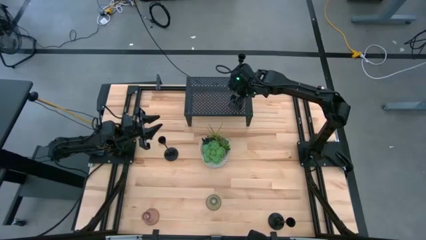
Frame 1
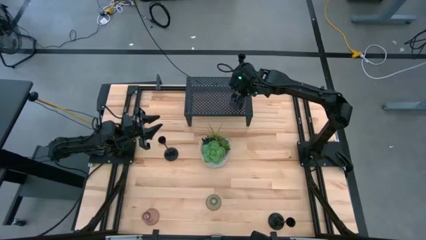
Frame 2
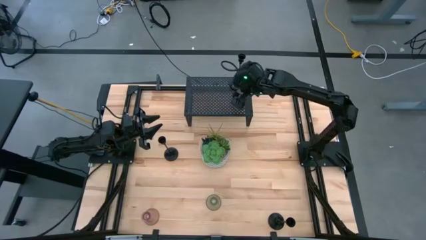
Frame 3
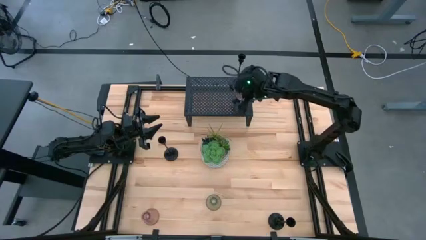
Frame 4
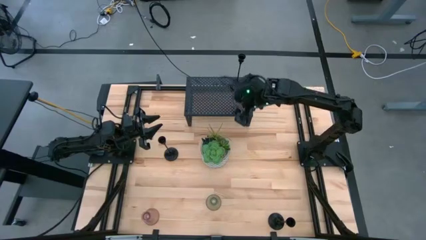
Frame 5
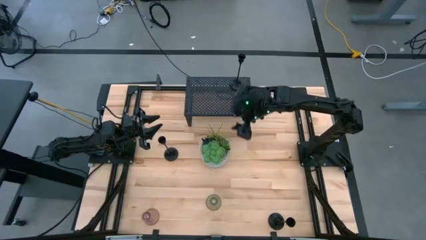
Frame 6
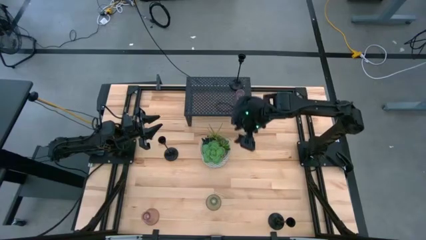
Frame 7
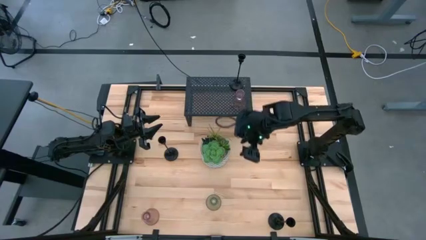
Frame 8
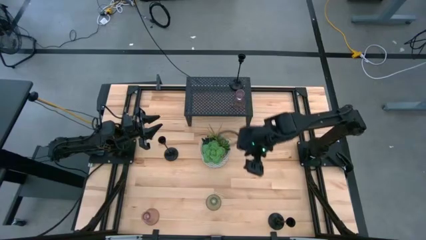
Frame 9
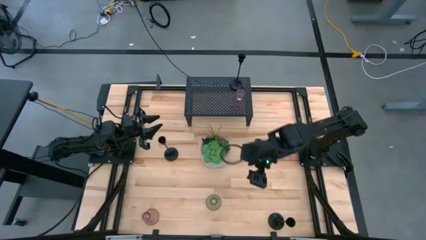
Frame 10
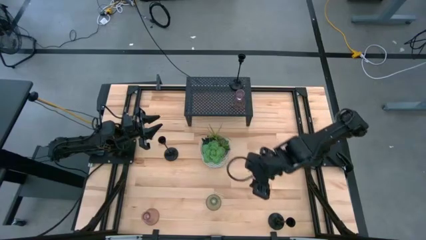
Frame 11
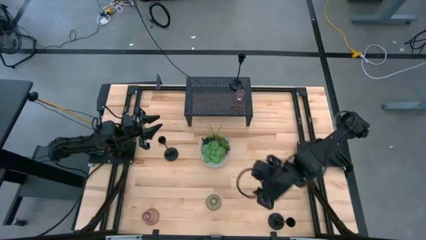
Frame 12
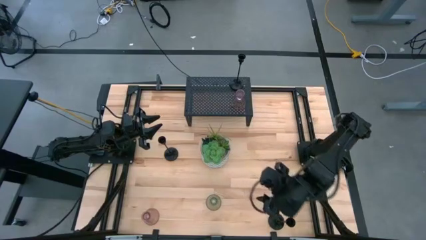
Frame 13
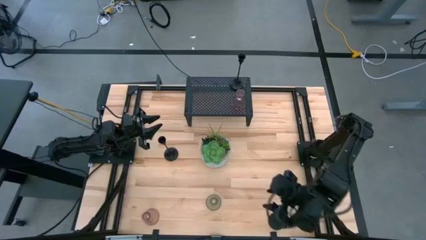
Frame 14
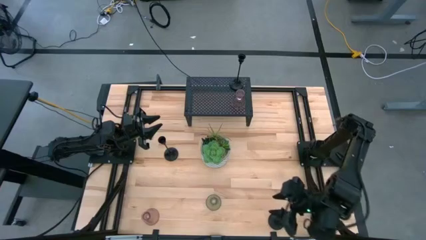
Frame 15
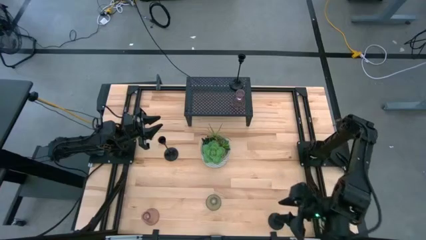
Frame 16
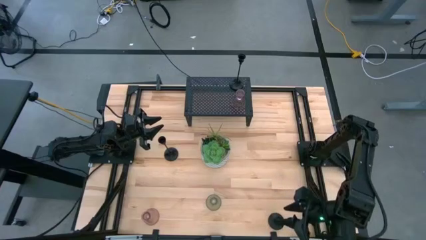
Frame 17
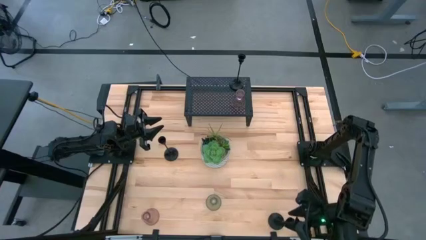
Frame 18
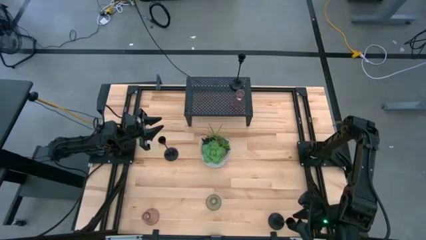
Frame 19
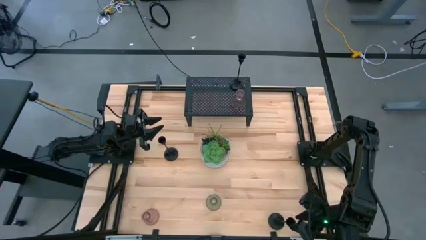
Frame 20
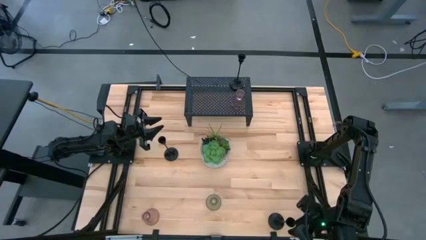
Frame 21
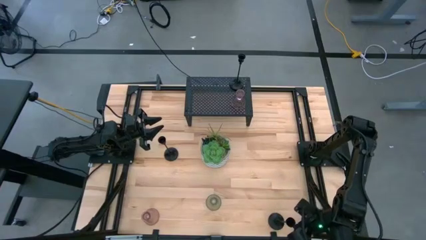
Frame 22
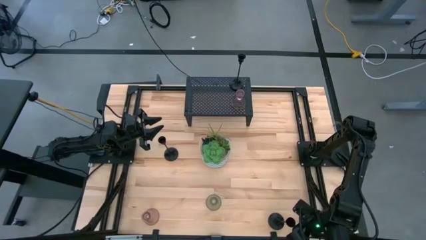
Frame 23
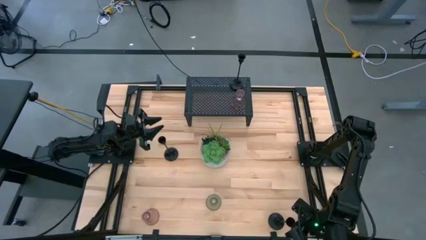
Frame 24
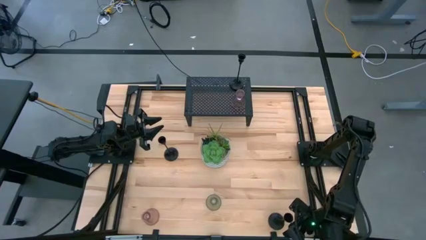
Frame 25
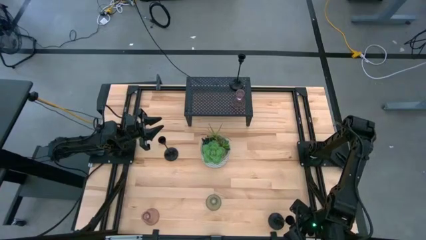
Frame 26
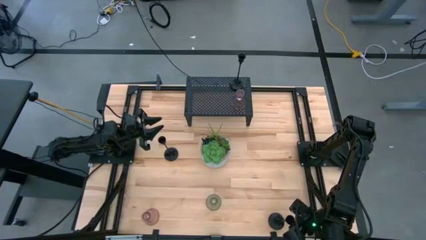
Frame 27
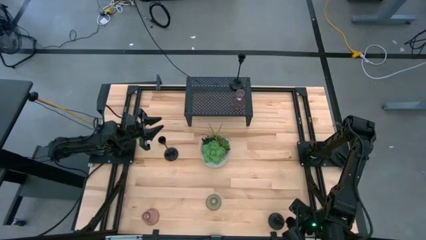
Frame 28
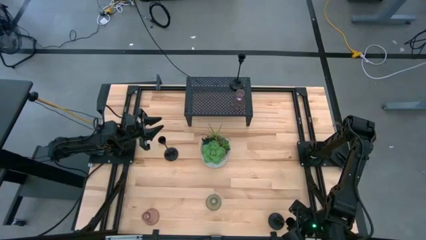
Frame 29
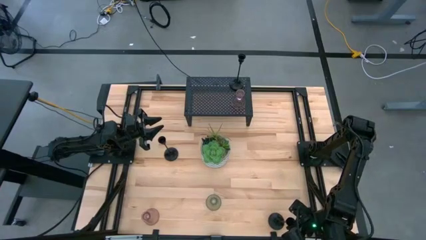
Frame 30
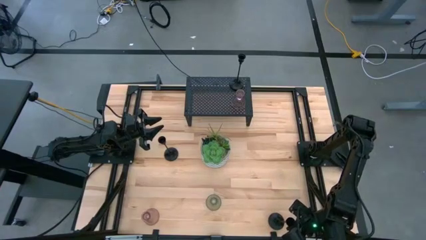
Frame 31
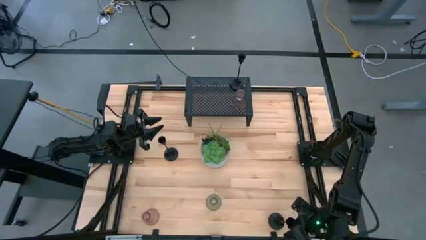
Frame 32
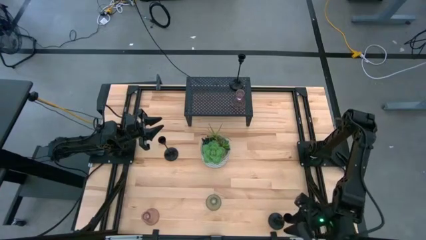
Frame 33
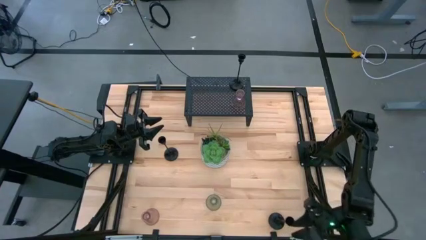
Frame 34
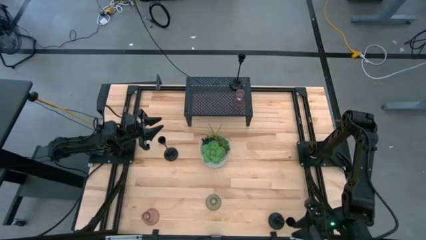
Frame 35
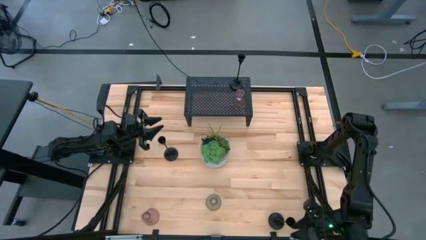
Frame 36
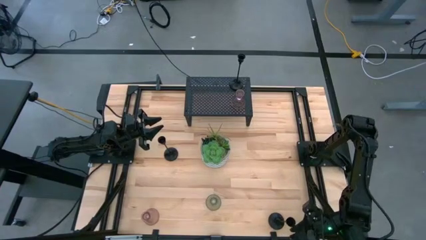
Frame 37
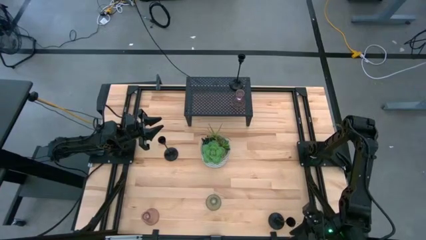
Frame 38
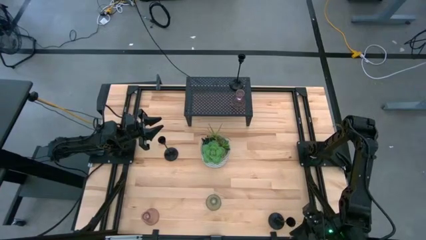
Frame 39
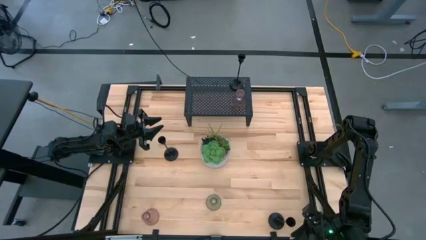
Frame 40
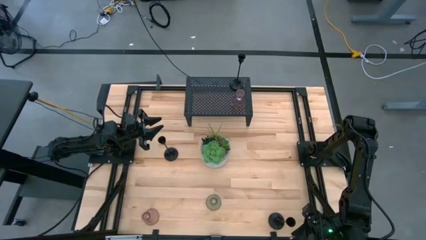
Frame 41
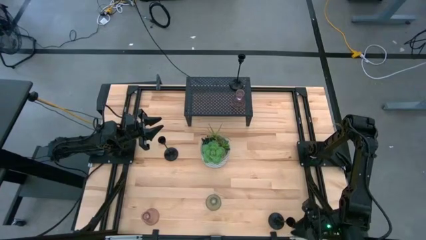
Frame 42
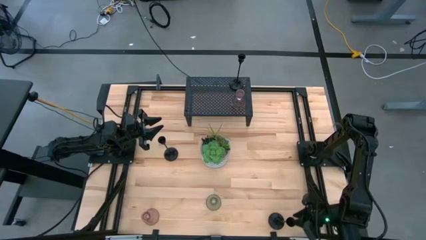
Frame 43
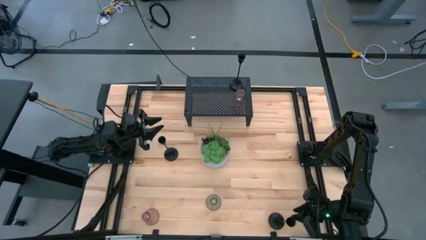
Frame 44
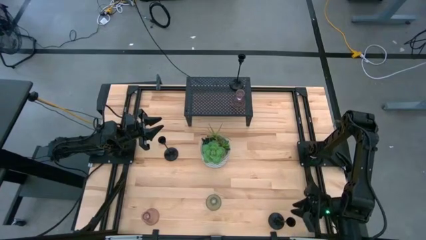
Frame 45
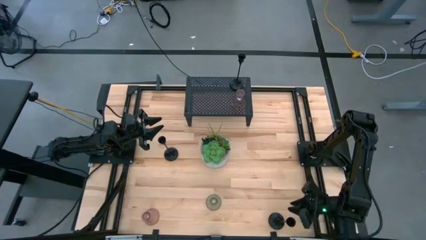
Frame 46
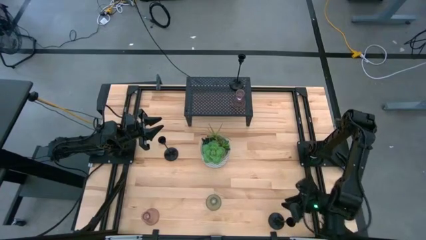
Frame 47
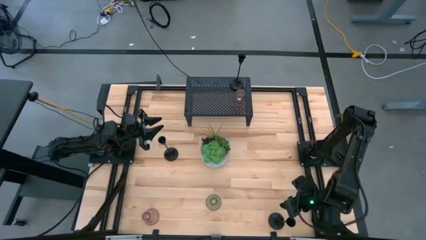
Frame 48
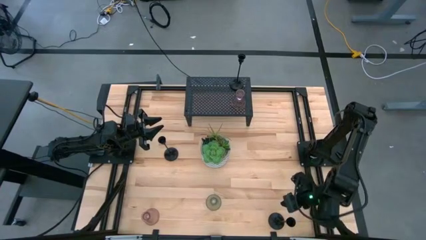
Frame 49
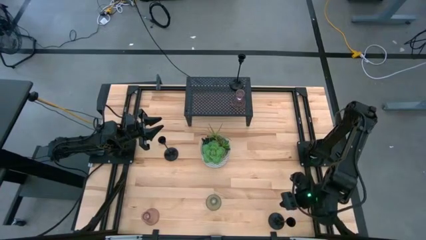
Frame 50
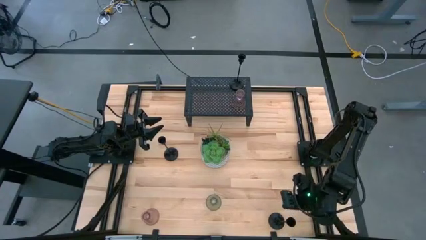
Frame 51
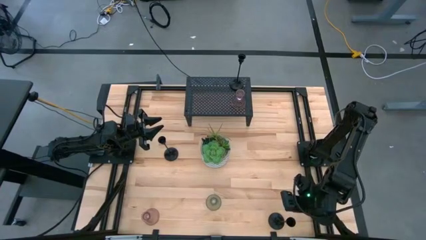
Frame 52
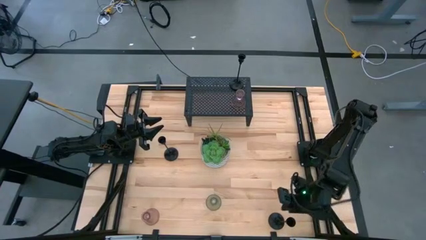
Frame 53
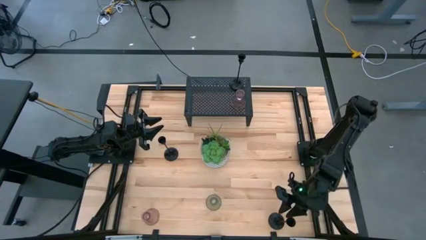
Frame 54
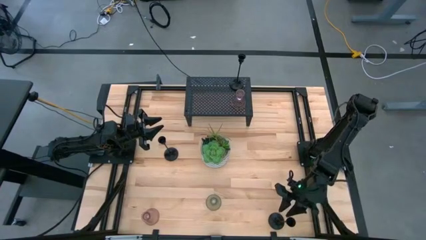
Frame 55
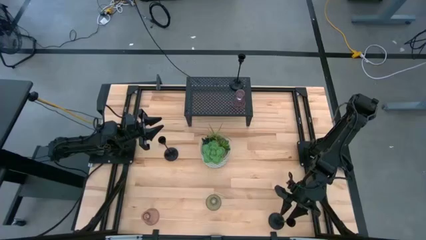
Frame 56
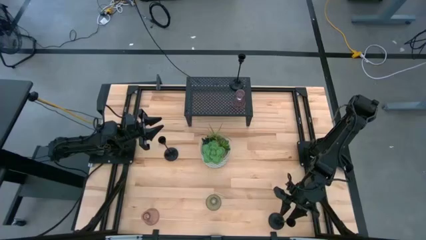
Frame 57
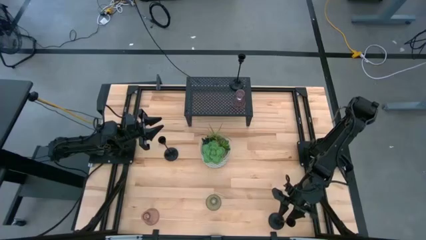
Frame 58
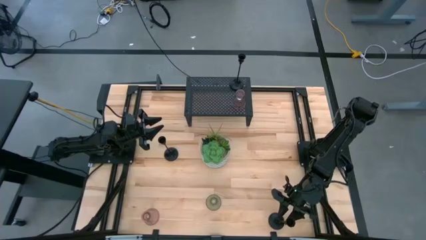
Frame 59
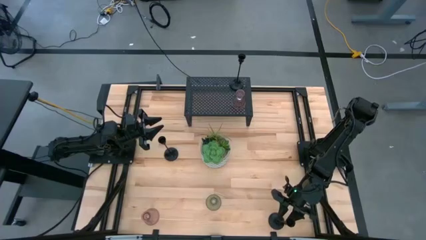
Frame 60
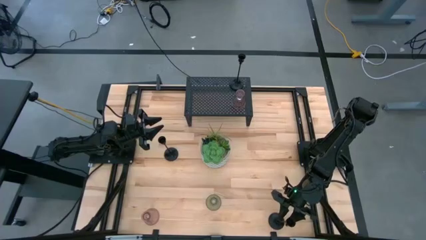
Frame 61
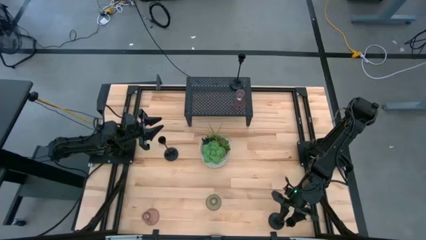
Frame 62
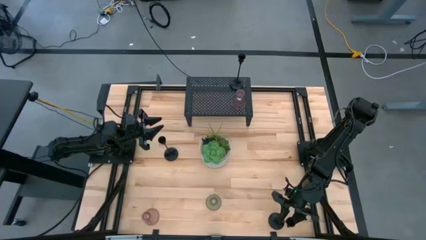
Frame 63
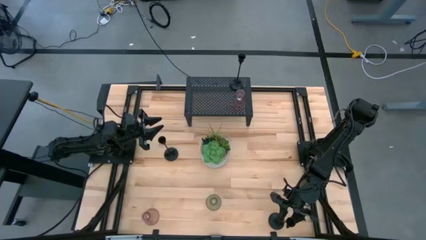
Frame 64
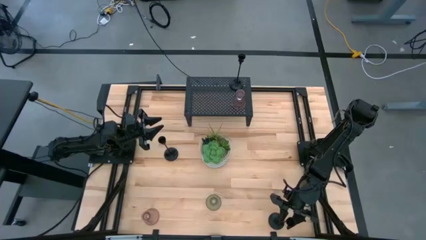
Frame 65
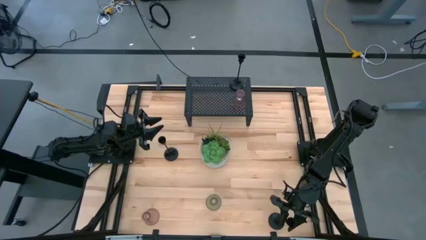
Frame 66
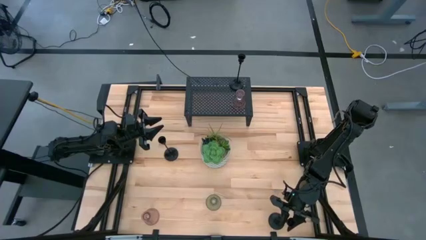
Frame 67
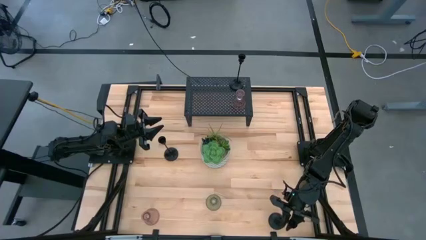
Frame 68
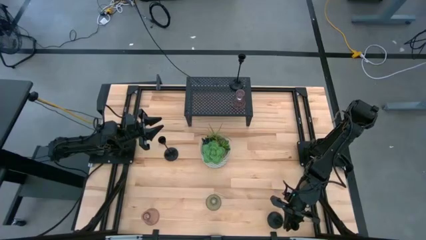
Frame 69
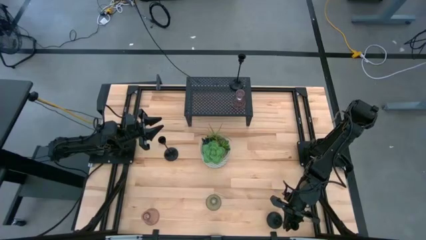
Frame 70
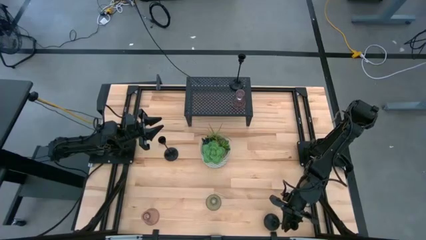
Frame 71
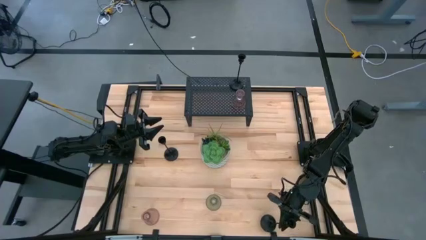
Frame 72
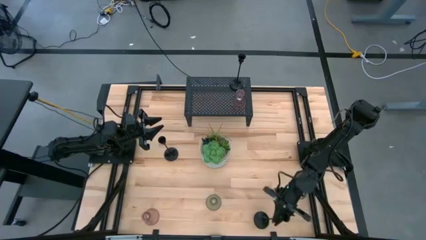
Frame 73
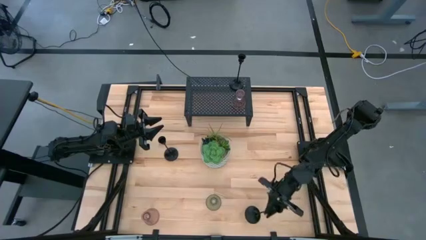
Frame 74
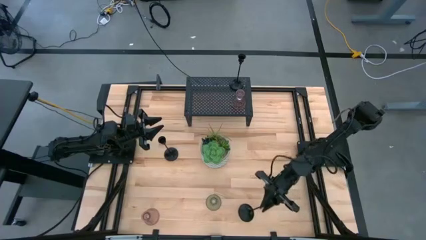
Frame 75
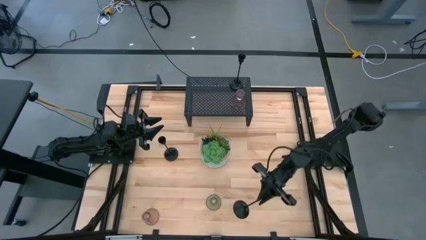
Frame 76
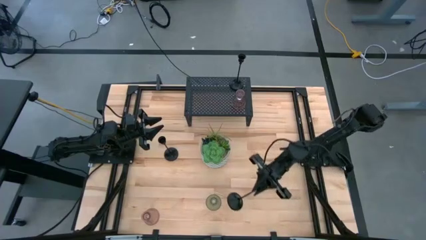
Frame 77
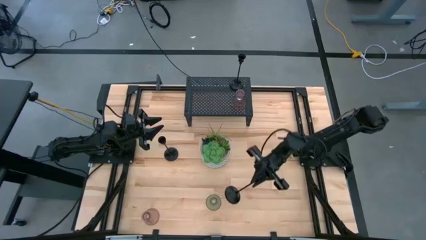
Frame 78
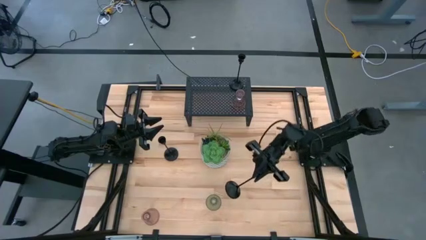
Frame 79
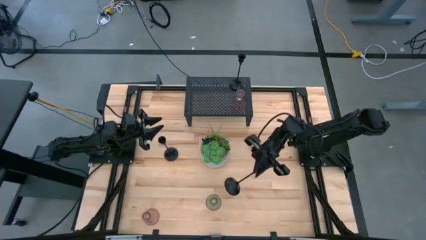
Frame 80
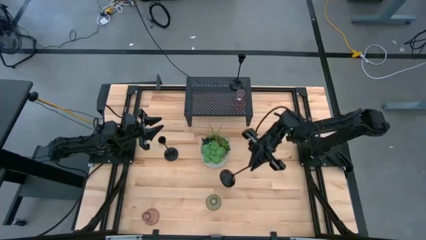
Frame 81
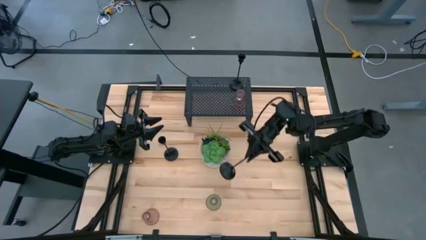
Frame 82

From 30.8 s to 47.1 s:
Task: Pick & Place candle stick holders
Put the bottom black candle holder on the shelf
